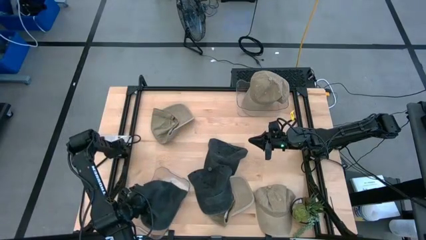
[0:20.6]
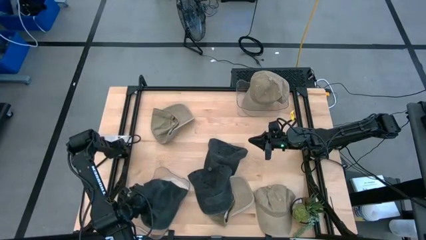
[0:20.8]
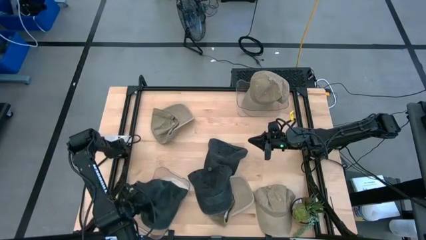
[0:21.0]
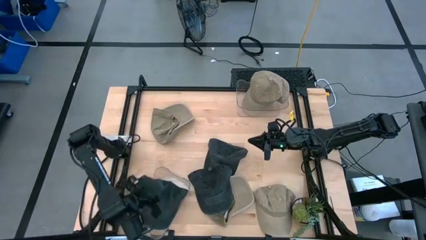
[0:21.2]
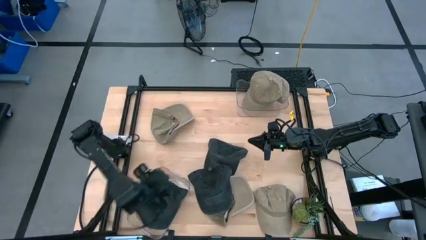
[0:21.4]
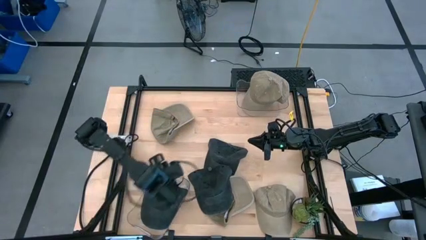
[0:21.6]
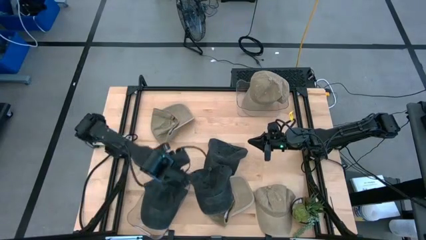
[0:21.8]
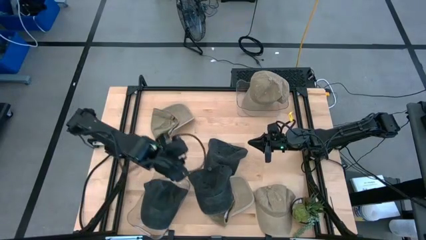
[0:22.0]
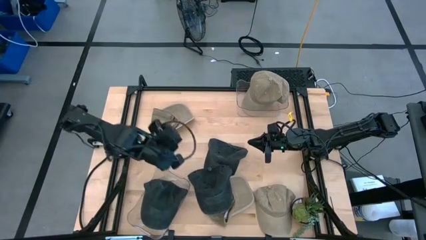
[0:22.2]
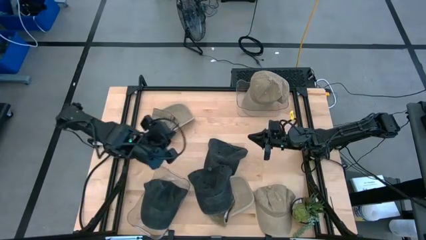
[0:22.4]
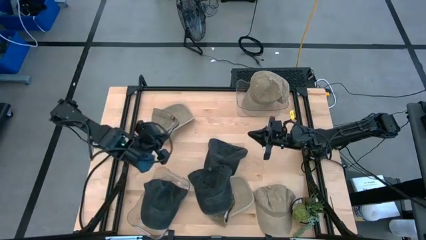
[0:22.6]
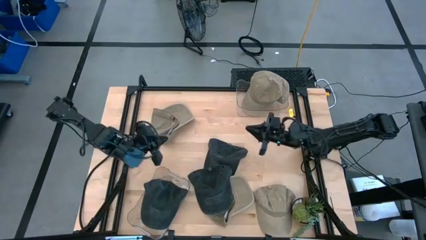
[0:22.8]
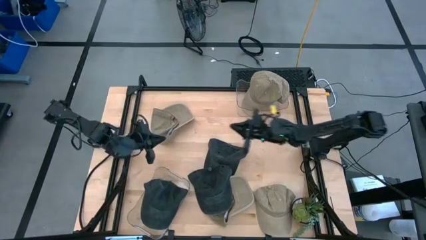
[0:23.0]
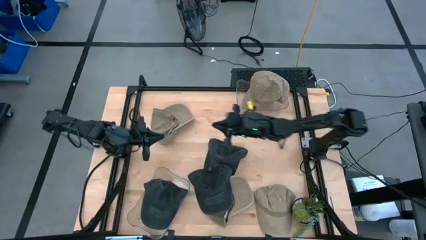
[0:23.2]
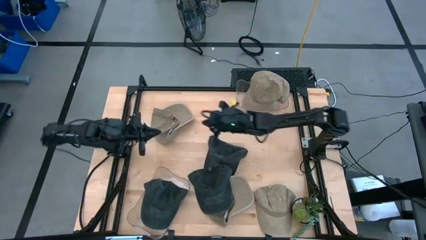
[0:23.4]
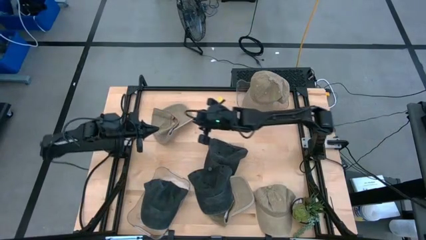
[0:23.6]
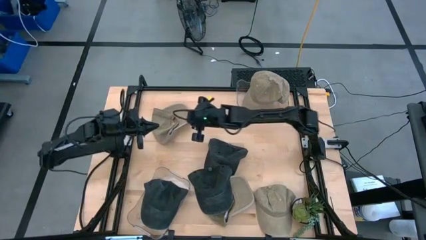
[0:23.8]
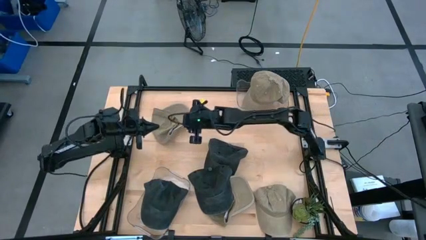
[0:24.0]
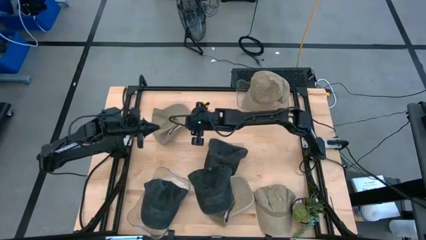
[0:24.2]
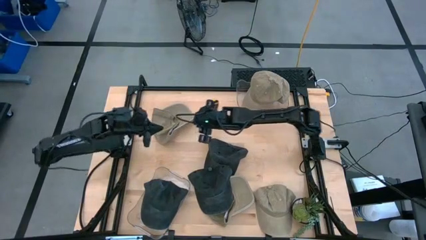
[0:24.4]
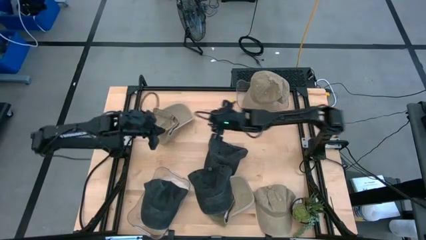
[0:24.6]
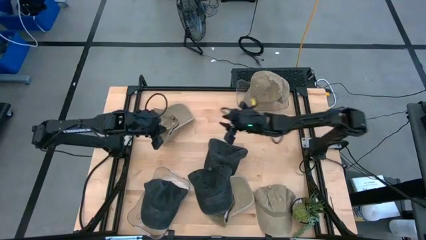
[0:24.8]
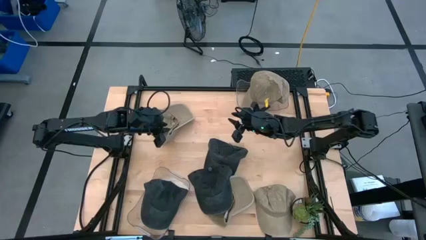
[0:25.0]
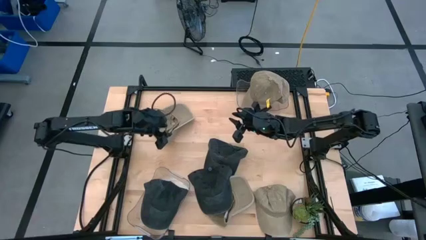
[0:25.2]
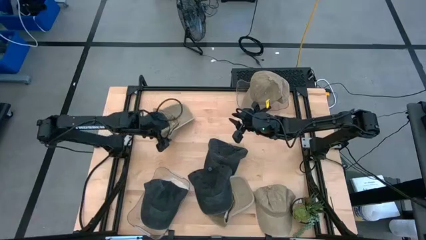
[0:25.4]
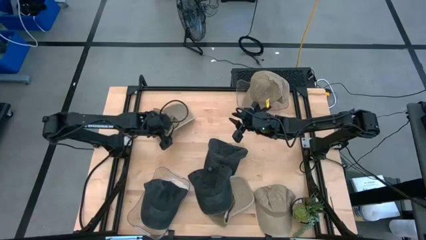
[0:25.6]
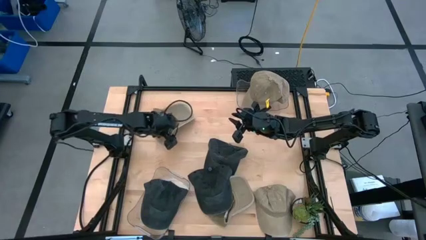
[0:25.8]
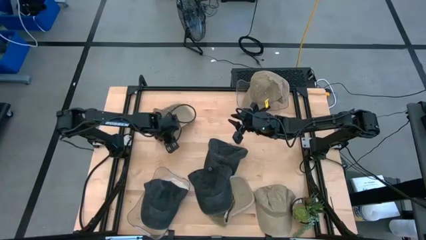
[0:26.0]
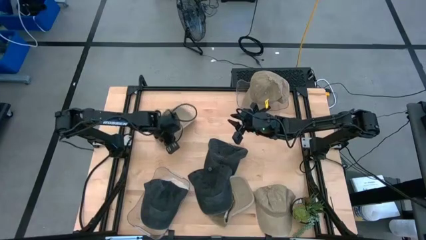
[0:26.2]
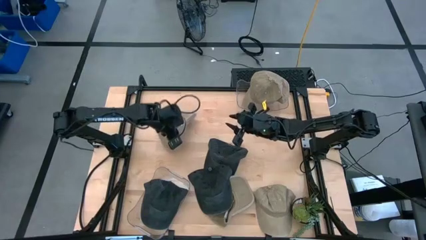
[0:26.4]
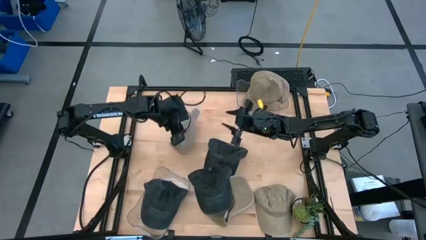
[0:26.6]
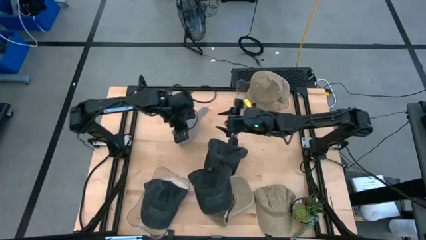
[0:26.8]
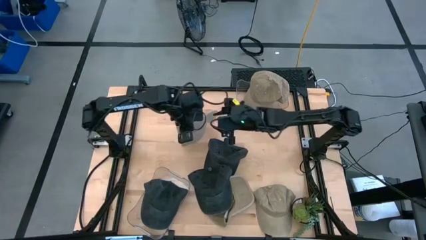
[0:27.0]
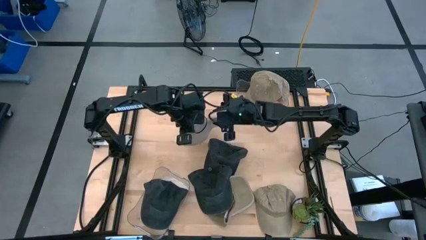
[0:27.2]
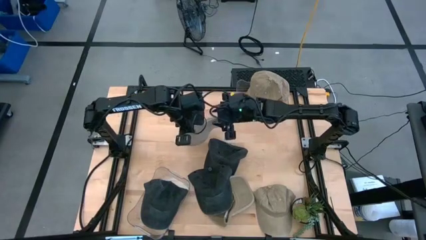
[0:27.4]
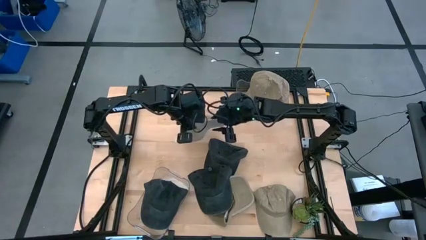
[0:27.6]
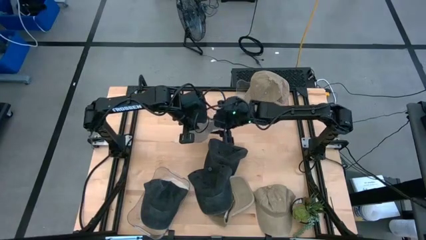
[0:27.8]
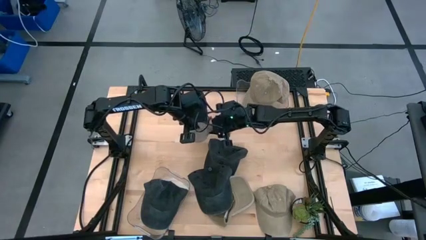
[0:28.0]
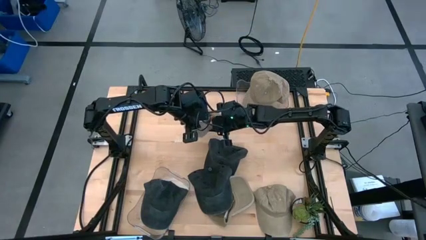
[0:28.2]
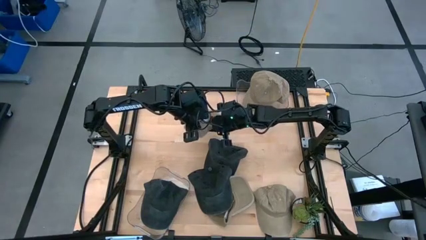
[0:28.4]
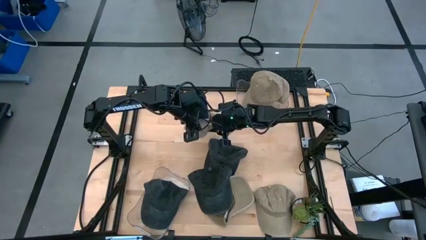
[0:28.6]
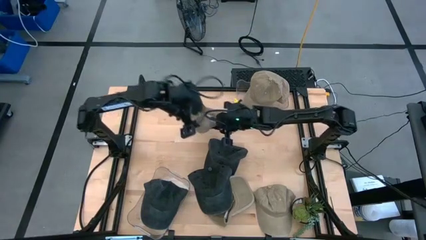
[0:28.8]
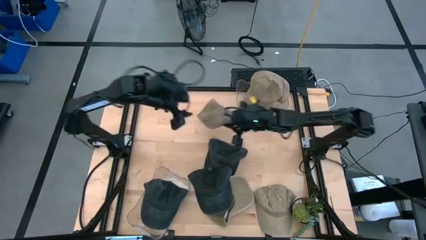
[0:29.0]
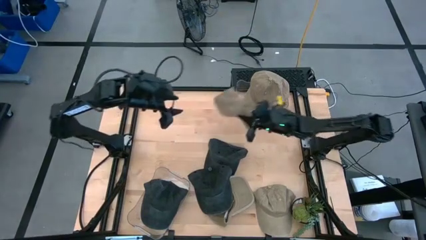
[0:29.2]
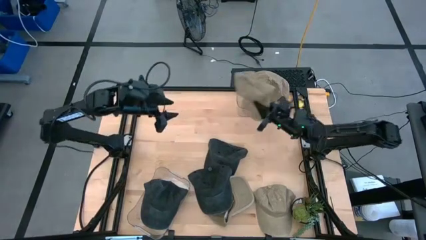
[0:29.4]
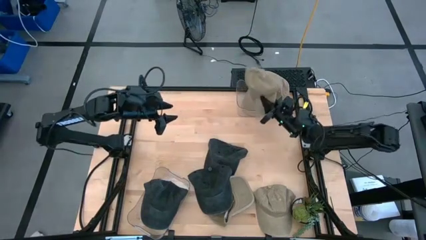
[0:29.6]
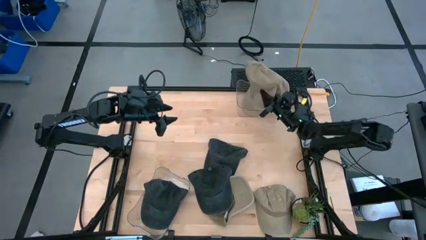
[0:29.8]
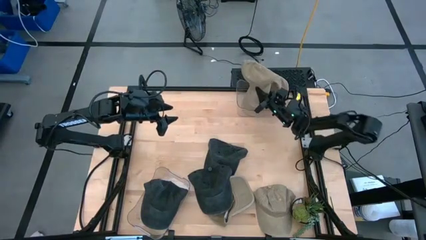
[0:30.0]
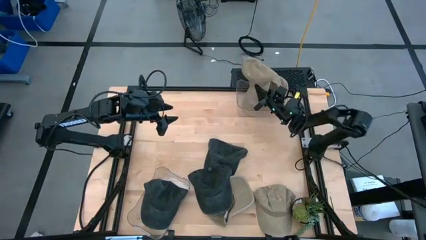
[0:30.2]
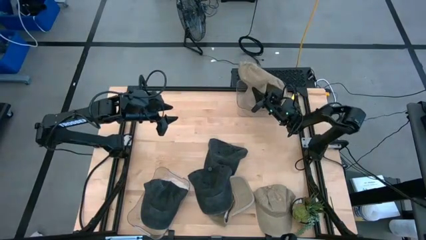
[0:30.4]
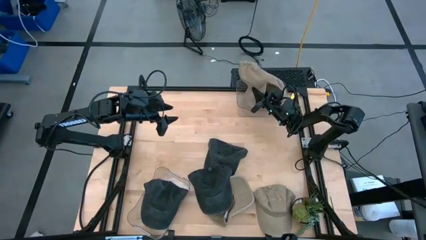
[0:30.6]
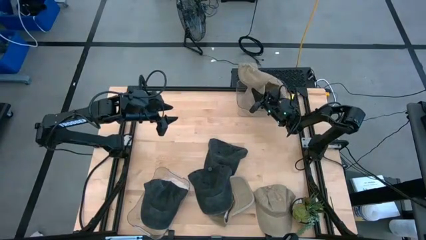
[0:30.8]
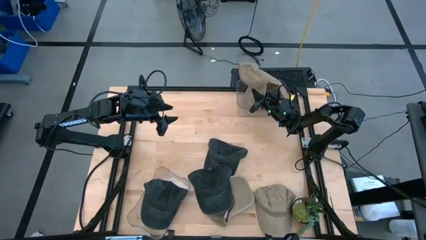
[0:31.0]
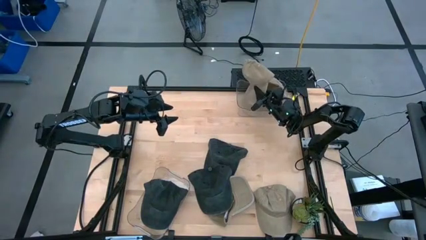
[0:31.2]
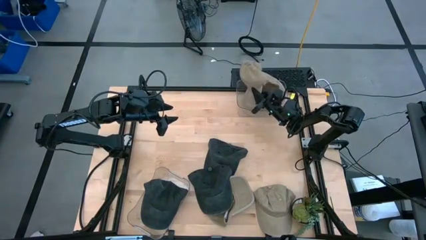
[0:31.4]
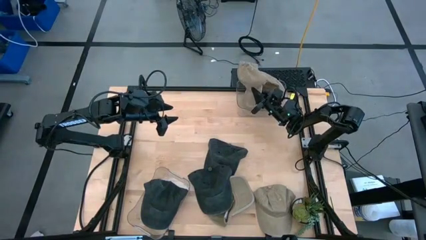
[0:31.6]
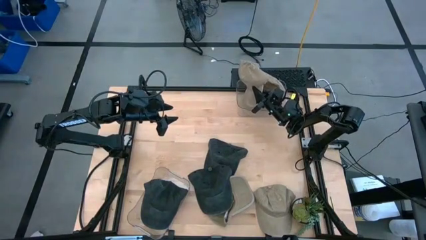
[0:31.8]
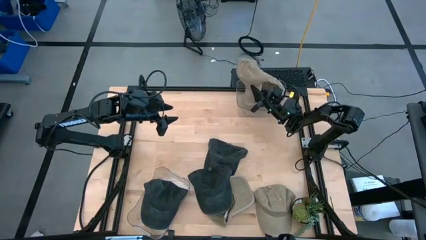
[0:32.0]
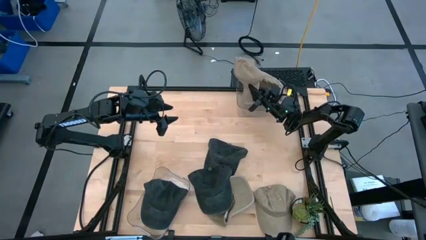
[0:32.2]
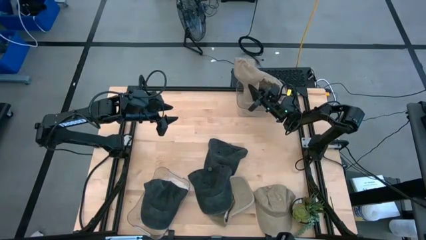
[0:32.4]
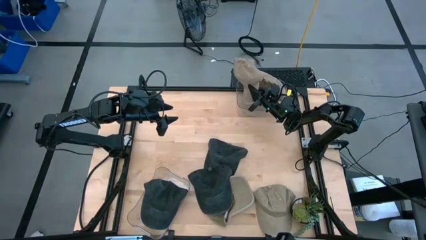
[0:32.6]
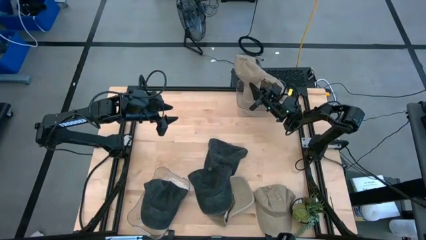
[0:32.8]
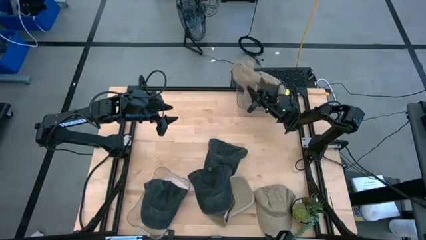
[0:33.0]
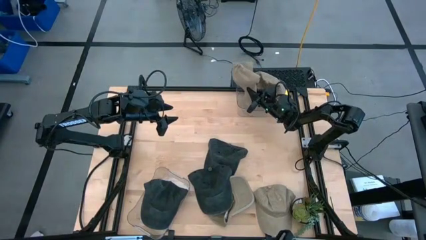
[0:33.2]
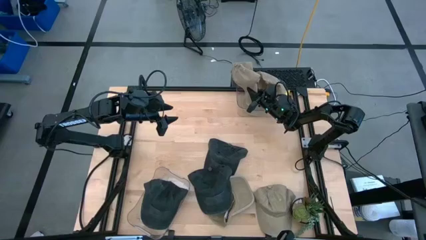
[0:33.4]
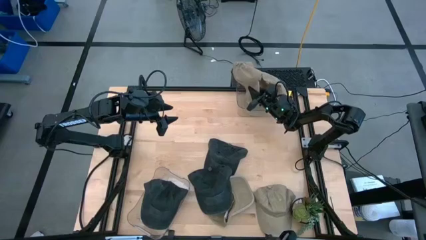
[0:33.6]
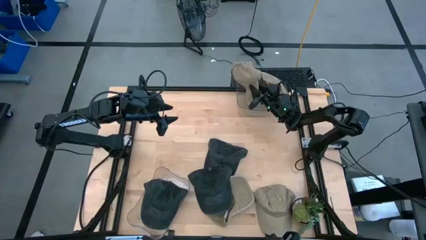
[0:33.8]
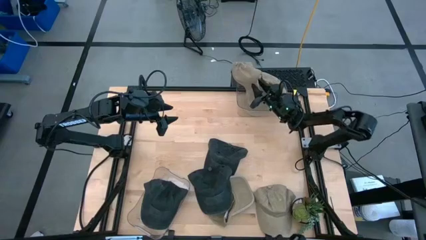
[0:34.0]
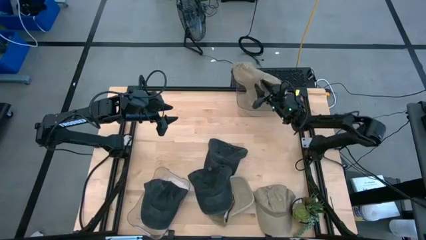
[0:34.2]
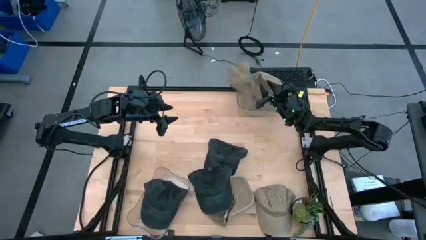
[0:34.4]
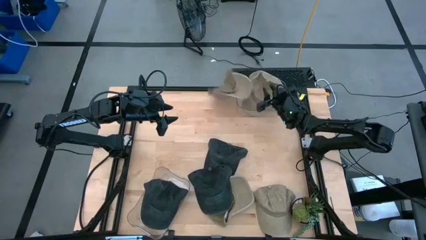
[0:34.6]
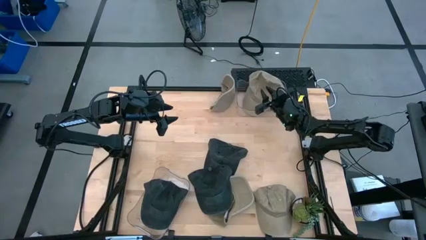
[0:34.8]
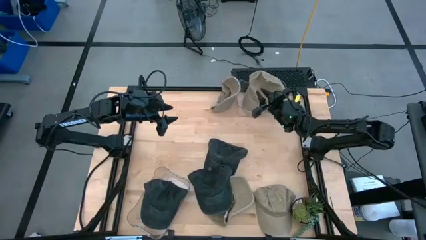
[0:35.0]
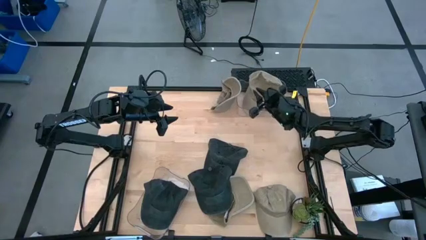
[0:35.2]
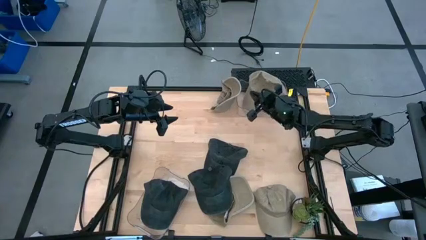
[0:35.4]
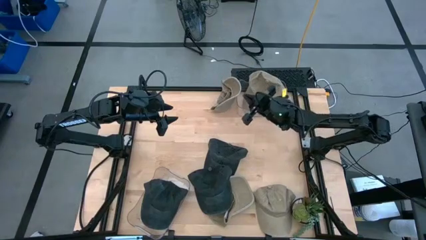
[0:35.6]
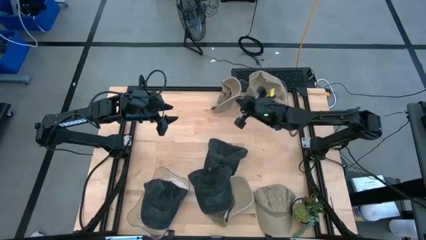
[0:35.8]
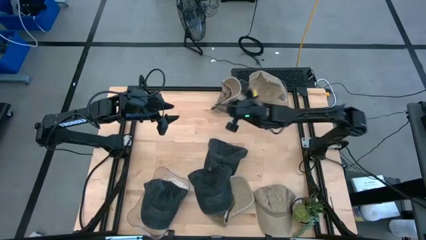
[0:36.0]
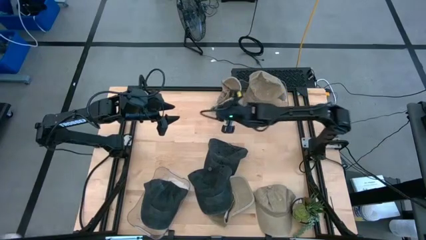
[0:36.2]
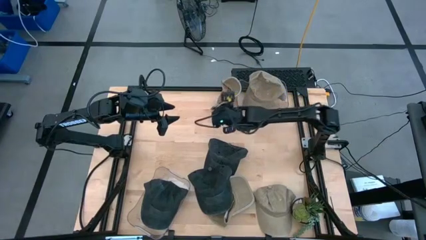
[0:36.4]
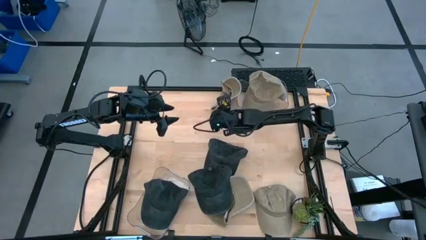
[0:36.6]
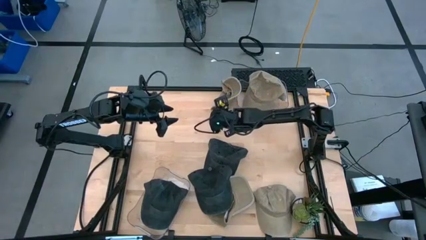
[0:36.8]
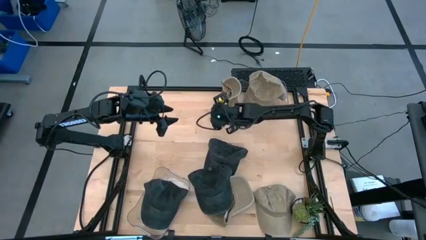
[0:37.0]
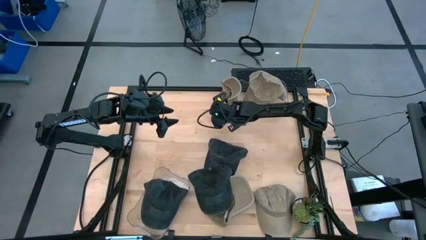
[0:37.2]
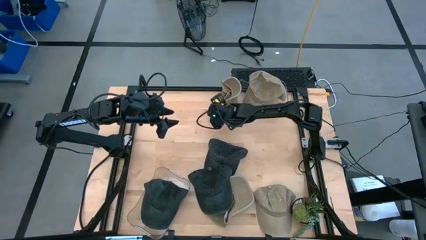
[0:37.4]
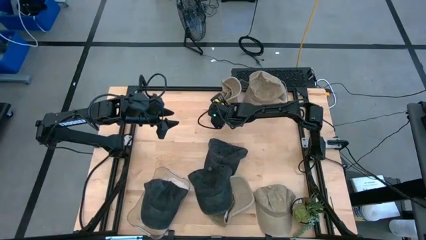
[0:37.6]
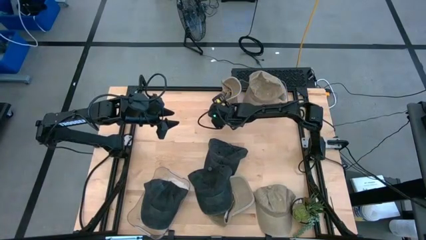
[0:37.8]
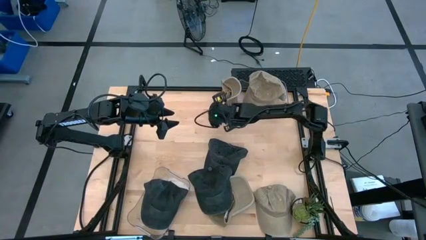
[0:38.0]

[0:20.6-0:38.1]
Task: Pick & Place hat
Put the brown cap into the top transparent bin
